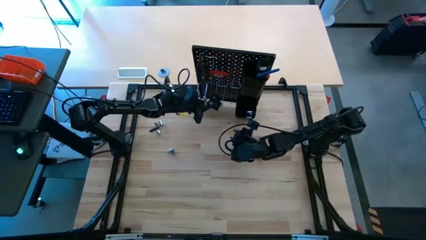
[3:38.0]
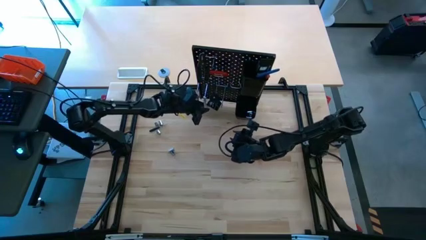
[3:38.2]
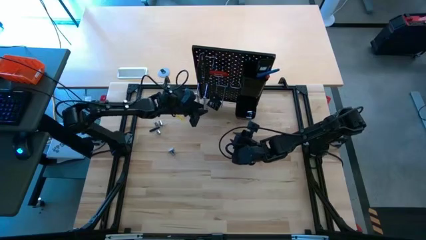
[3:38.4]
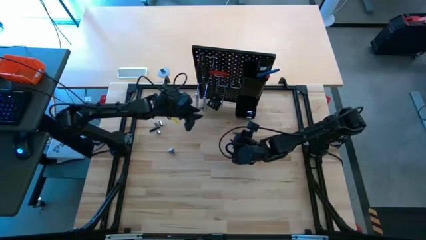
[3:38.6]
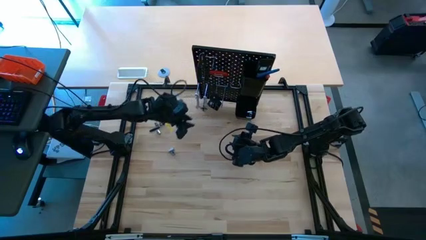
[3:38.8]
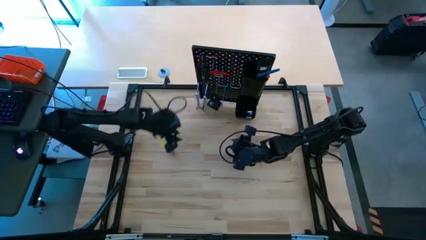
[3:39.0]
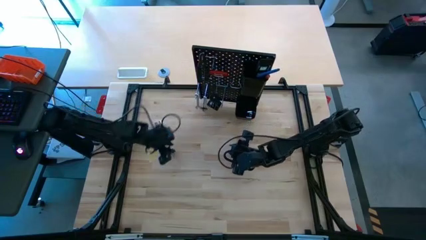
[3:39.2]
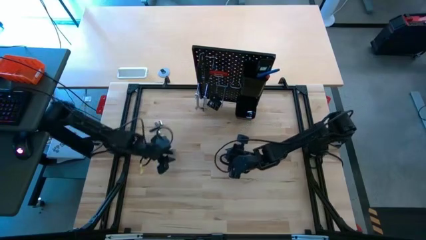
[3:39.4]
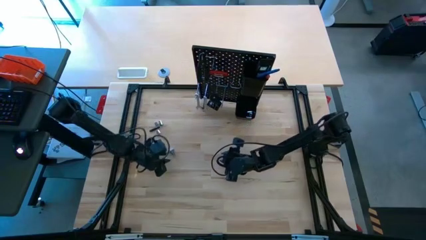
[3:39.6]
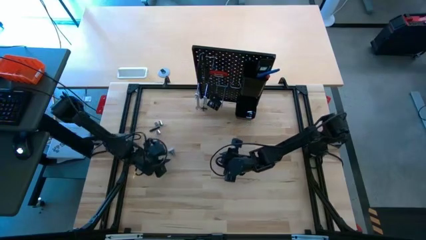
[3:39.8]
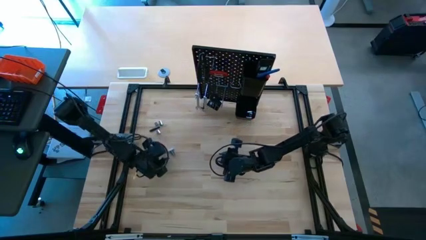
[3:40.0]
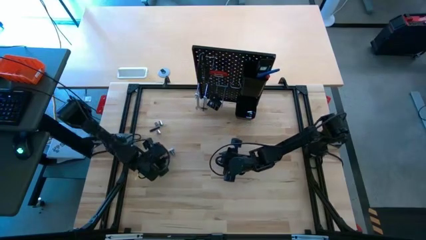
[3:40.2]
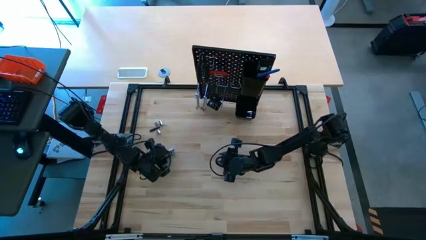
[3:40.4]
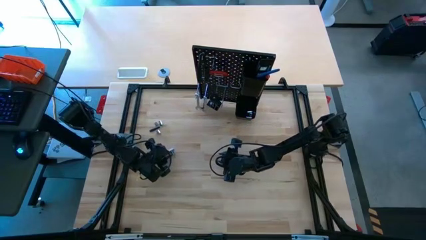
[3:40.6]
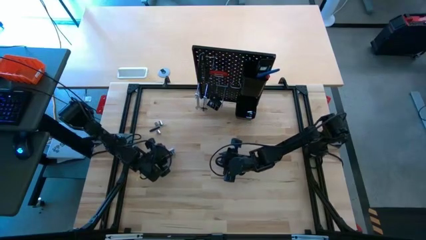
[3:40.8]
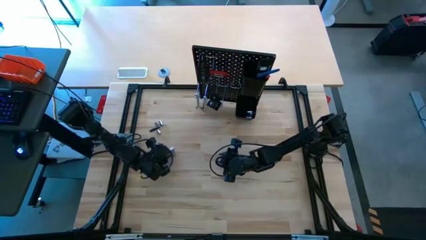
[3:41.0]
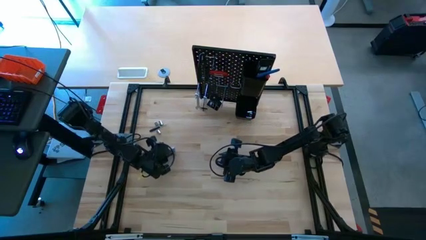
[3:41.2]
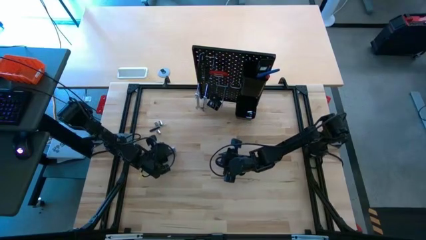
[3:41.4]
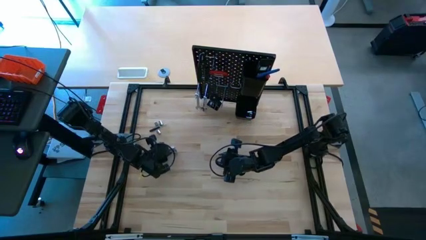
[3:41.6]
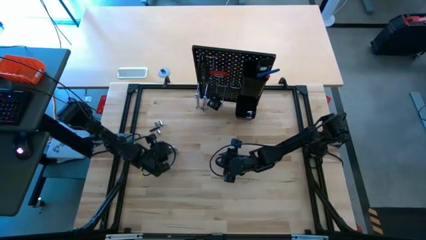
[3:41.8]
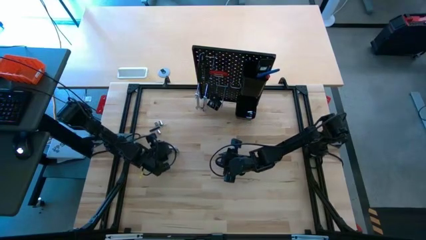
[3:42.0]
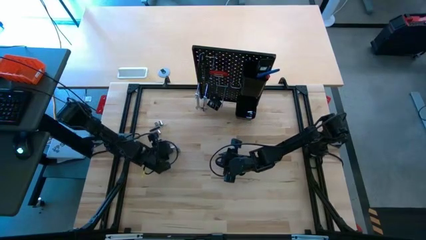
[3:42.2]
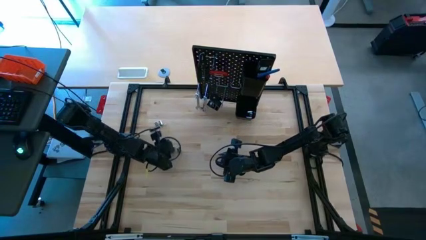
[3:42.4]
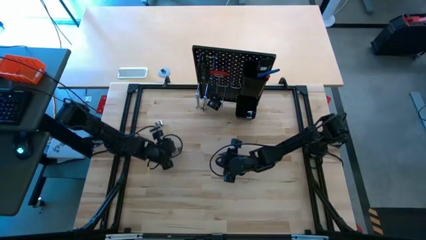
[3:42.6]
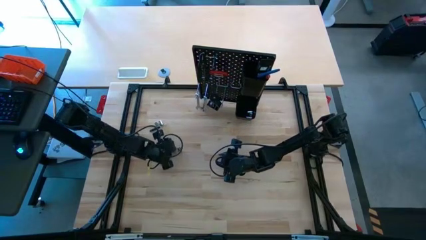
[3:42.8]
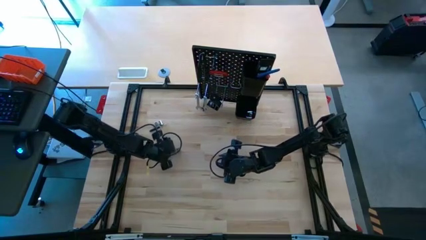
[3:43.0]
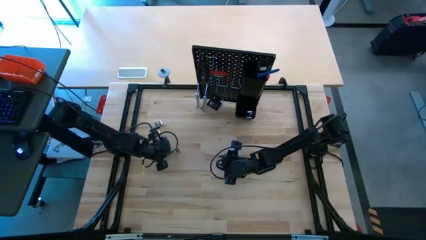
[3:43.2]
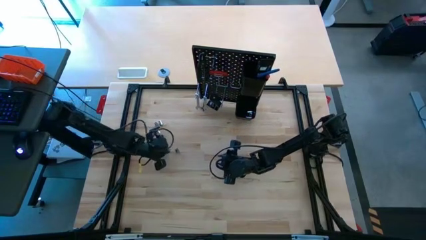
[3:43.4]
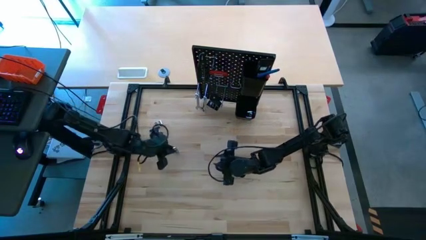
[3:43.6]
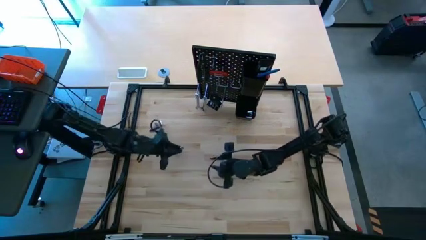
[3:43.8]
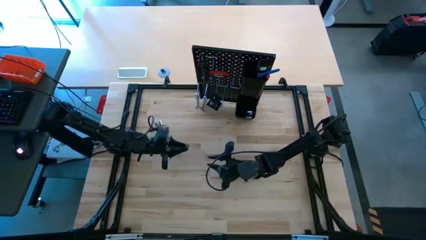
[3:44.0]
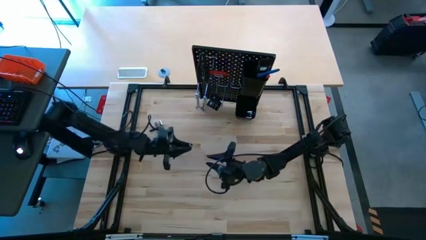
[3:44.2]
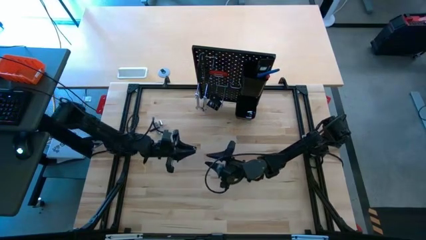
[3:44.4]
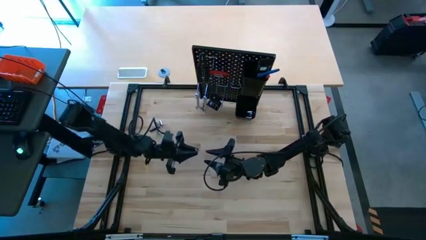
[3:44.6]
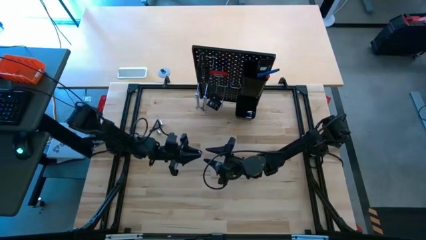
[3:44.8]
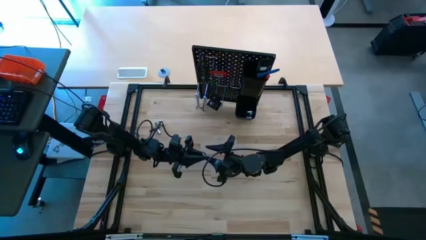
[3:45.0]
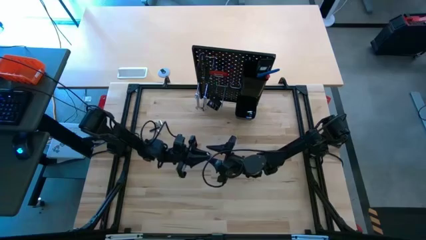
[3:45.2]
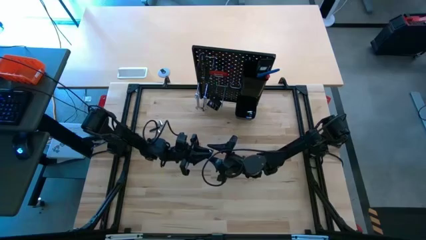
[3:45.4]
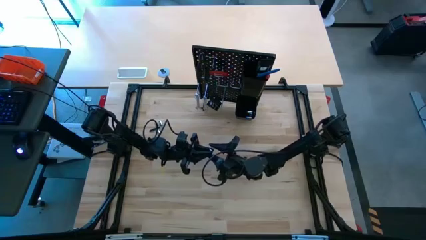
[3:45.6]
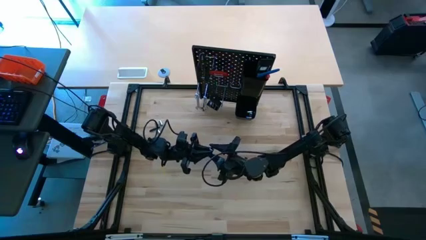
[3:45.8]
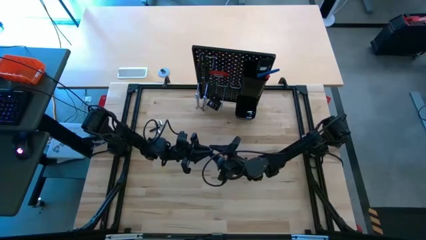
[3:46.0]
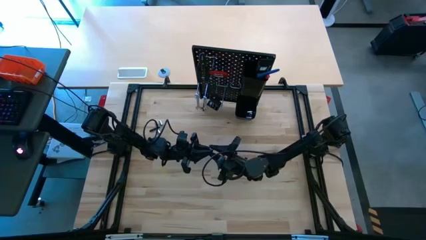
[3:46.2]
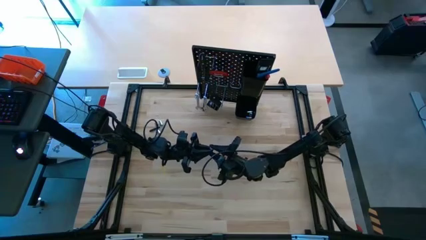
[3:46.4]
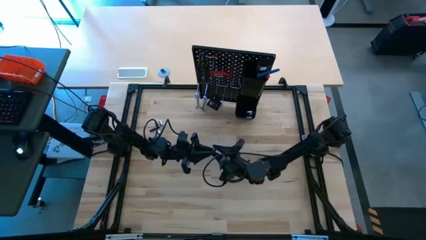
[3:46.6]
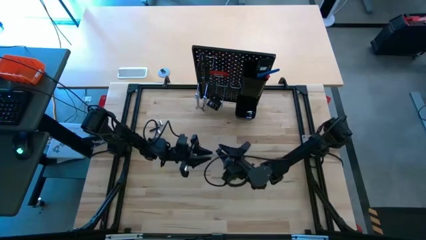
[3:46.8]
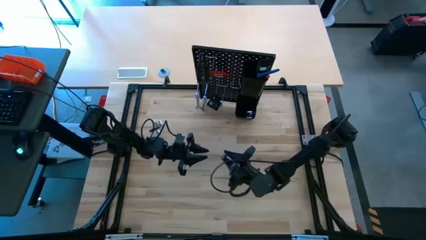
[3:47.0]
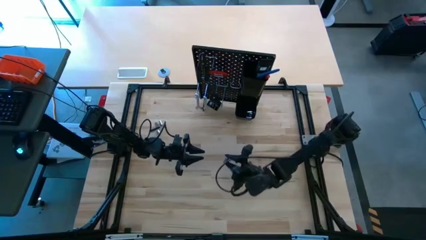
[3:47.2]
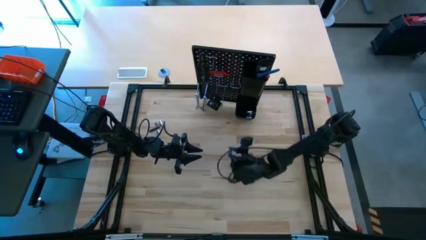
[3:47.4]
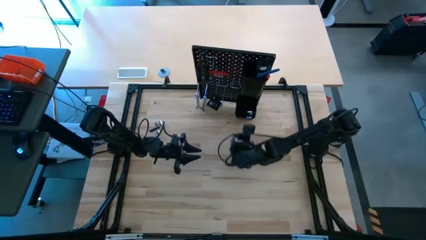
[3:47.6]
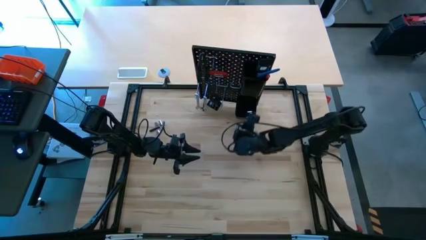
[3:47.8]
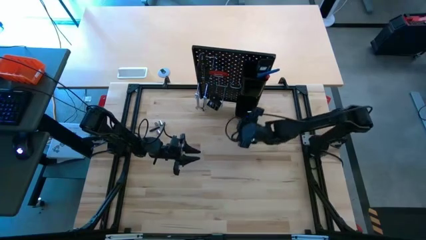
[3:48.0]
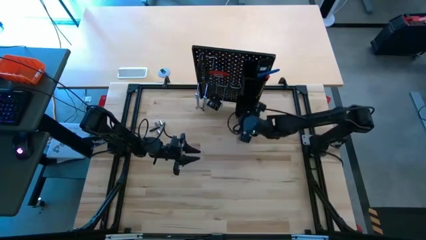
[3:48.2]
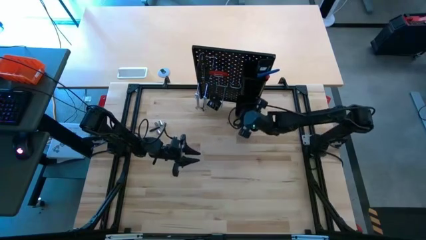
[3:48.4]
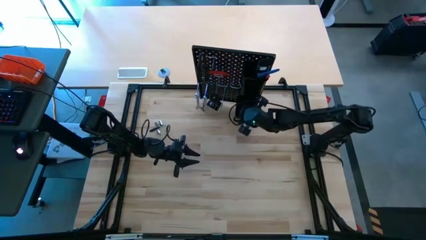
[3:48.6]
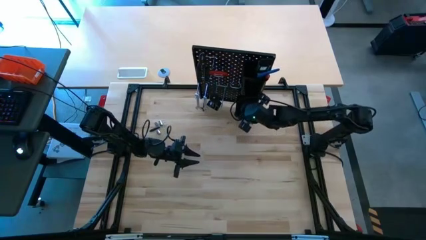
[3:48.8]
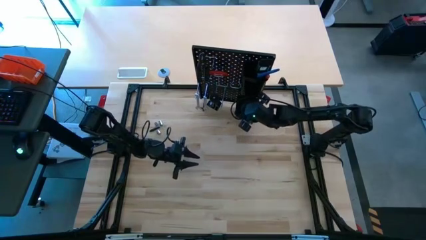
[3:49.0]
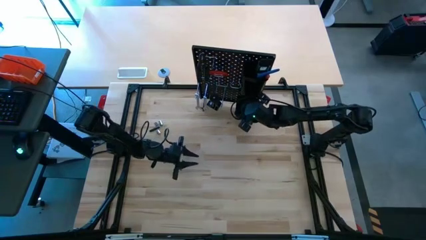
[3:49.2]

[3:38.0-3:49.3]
Task: Hang tools onto peg board
Put the socket into the bottom black bin on the peg board

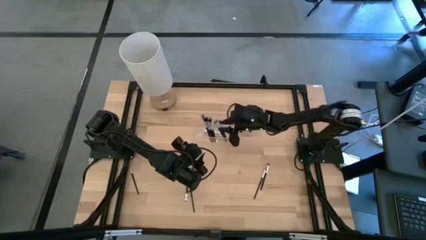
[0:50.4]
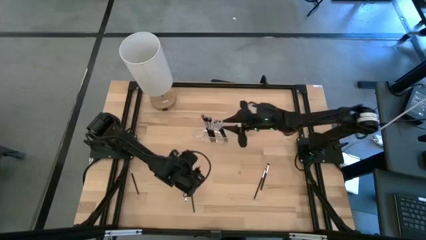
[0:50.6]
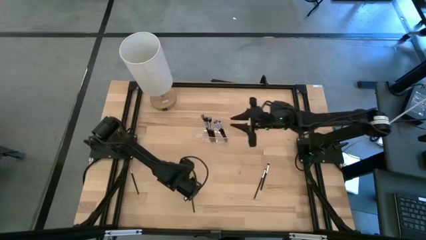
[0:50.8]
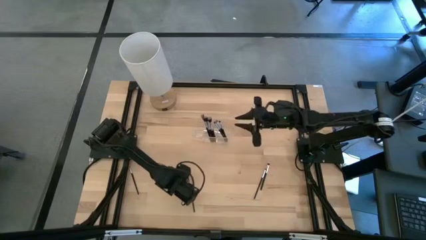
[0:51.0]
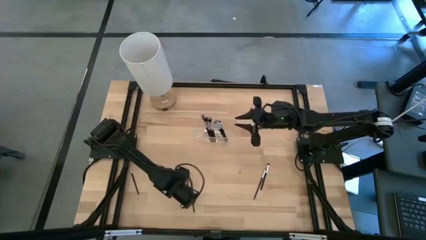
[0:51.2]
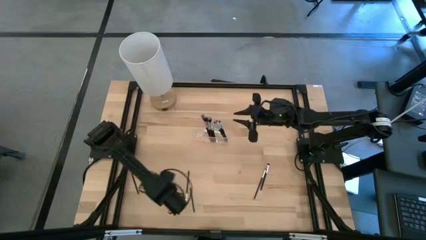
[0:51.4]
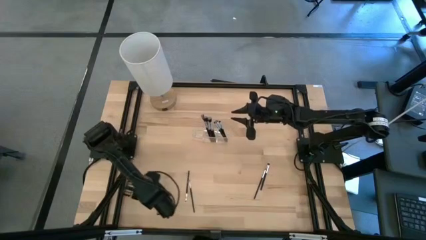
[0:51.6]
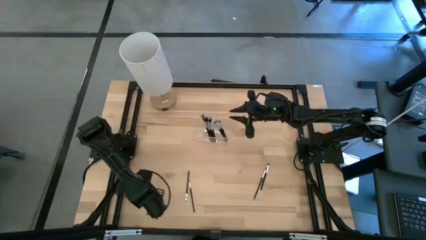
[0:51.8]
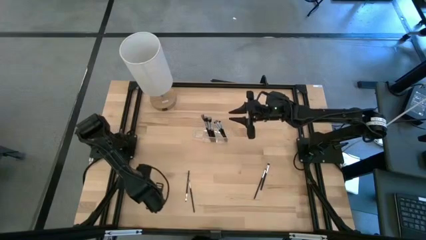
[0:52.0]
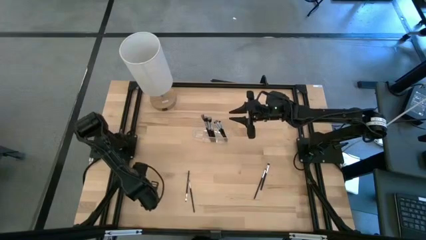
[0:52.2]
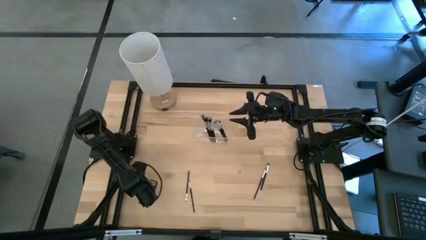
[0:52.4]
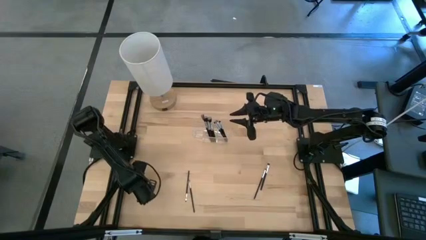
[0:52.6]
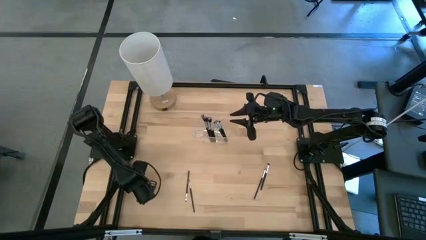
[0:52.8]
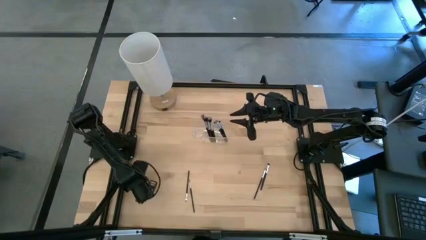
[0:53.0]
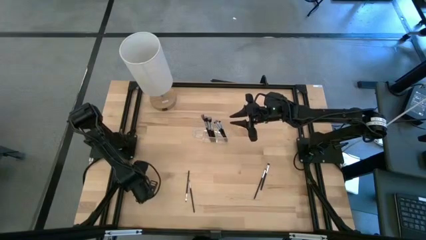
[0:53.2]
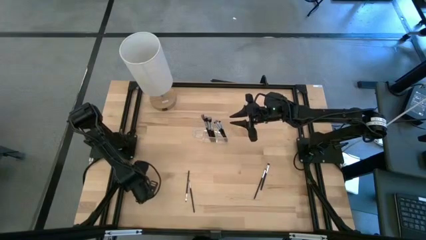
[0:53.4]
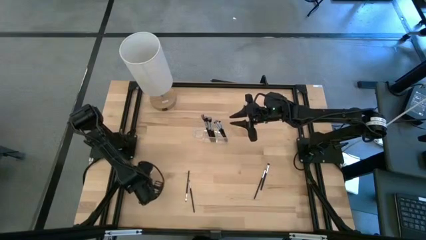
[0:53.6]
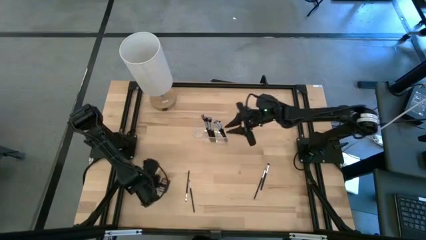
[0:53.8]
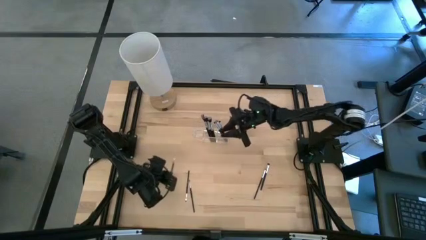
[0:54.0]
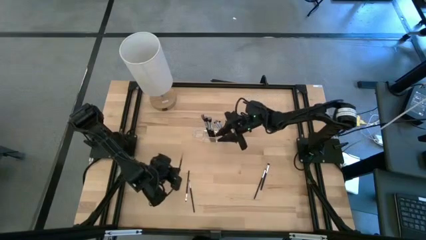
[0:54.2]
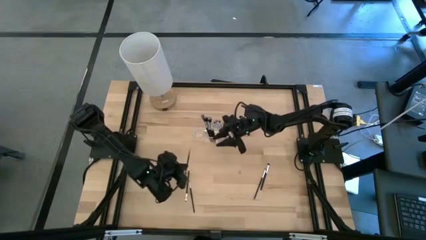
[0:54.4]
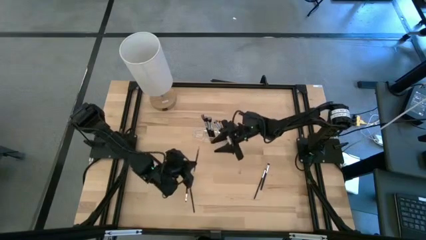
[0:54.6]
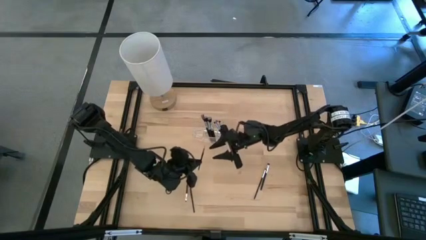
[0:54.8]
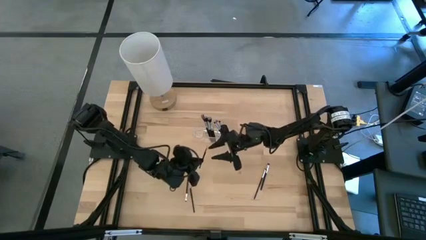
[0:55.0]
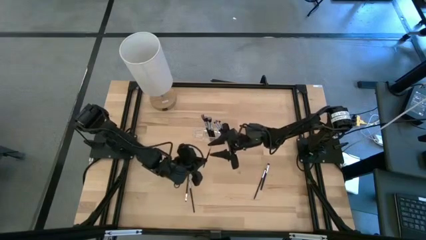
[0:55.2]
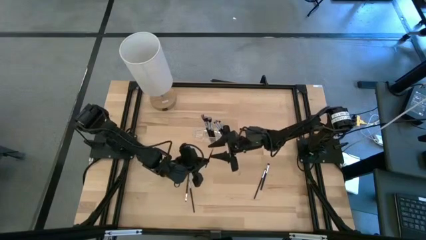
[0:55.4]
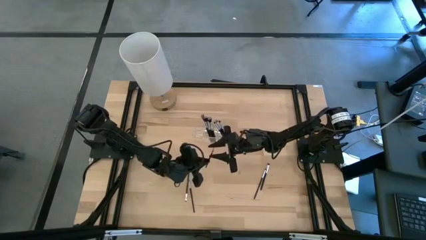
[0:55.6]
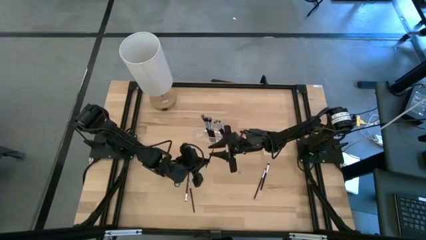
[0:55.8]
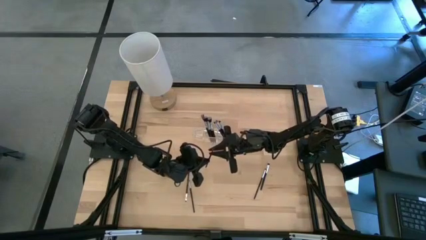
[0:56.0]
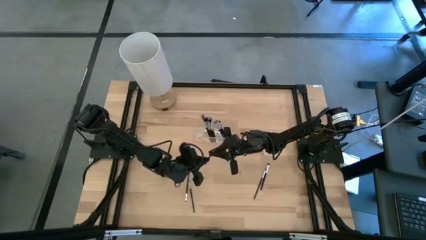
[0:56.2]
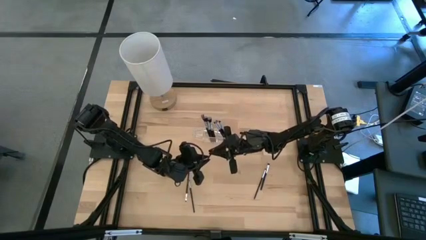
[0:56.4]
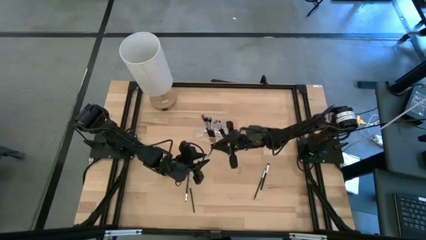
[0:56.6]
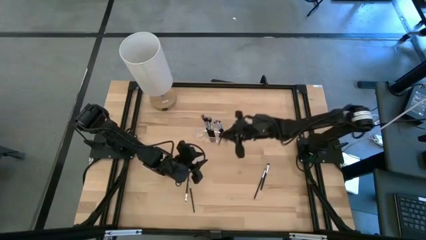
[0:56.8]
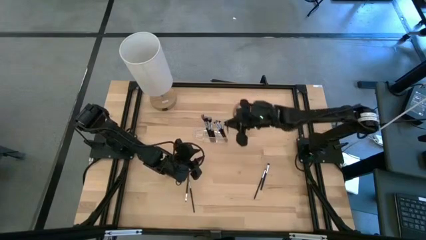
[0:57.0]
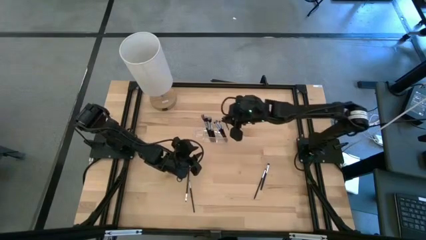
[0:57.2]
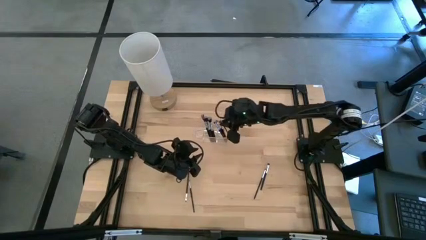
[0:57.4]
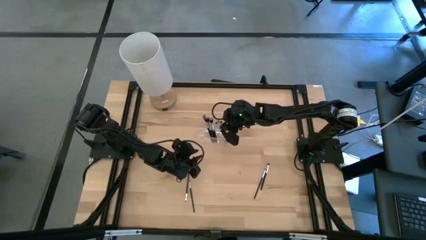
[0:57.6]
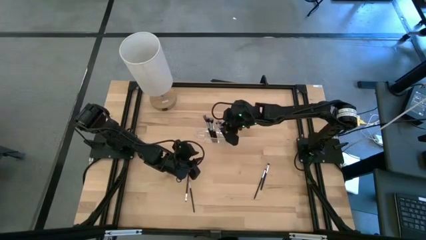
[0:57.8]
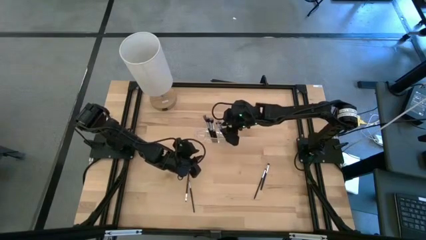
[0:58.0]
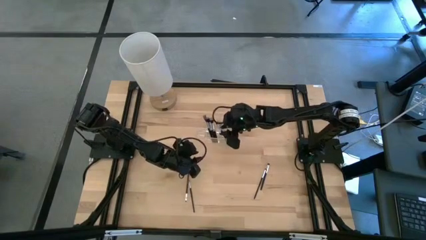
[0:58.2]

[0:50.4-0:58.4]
Task: Put items in baskets/containers
Put the black eyeshadow brush into the transparent organizer
